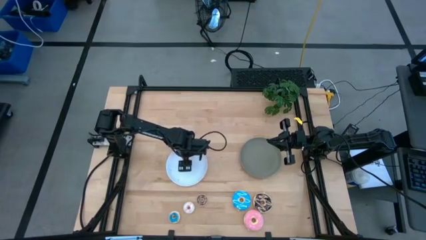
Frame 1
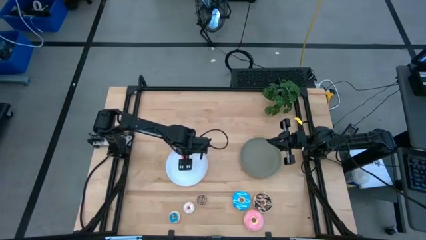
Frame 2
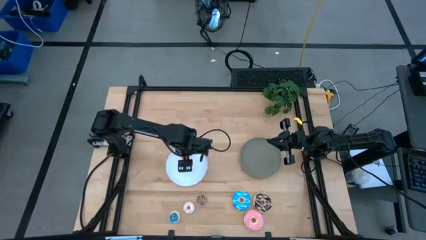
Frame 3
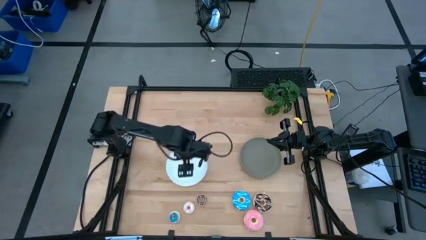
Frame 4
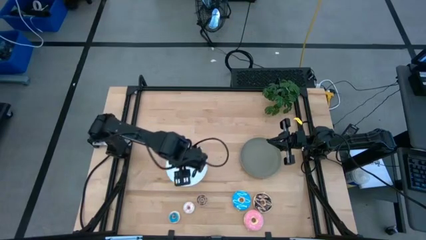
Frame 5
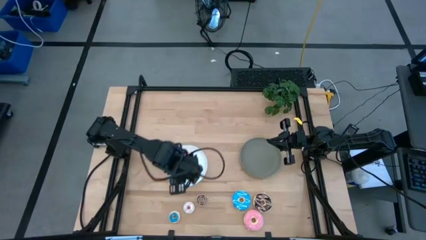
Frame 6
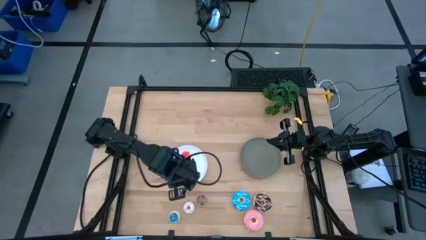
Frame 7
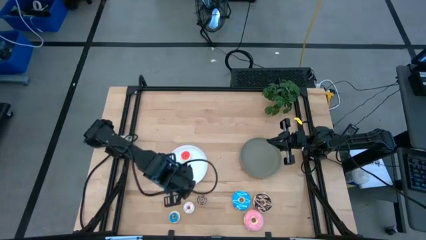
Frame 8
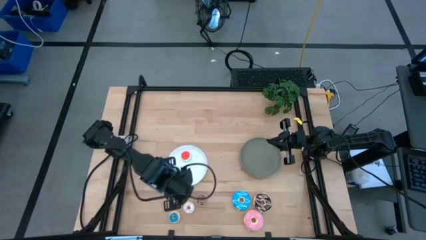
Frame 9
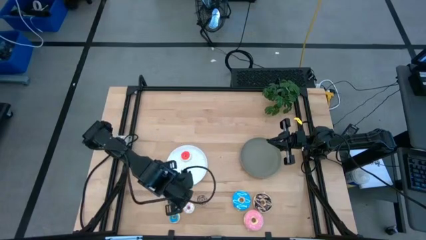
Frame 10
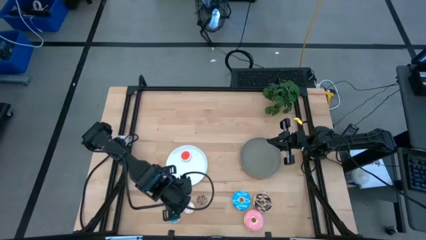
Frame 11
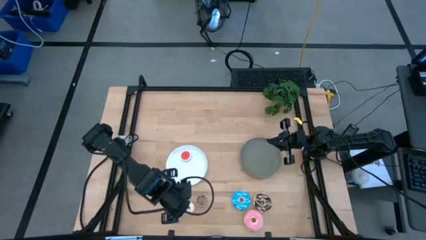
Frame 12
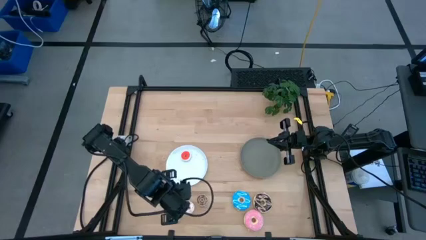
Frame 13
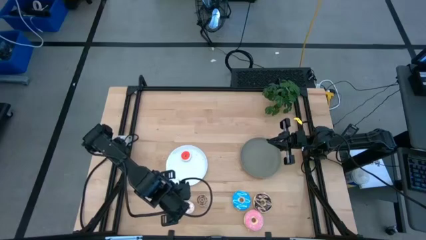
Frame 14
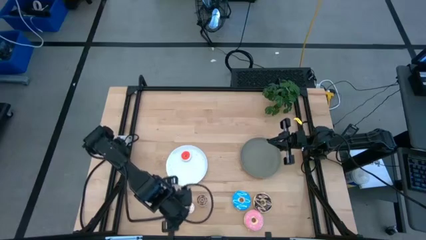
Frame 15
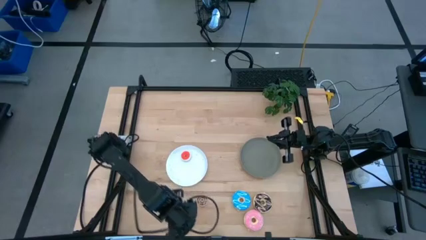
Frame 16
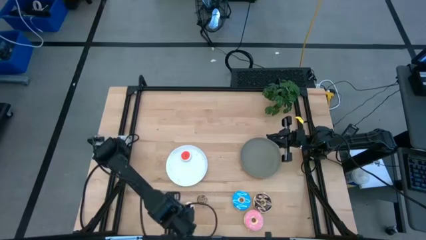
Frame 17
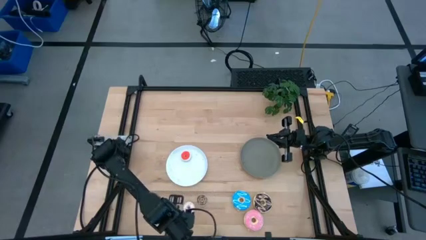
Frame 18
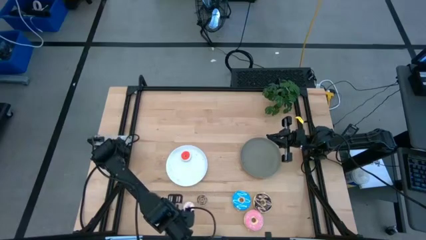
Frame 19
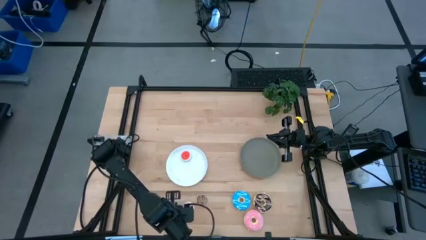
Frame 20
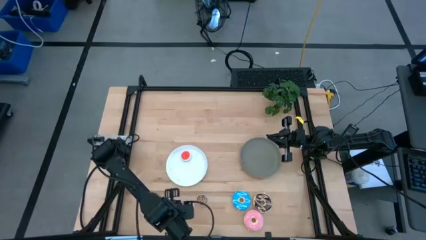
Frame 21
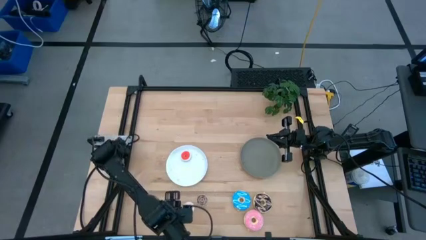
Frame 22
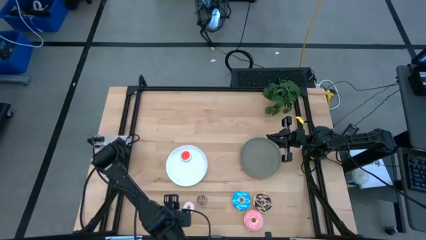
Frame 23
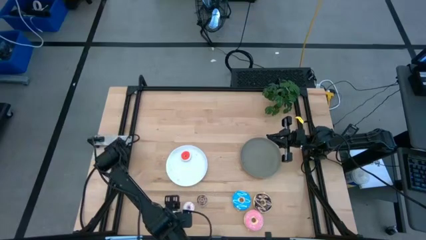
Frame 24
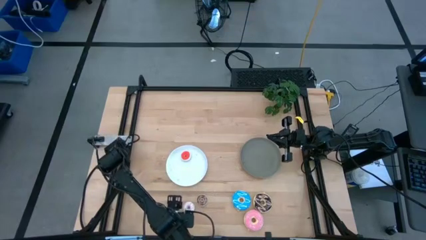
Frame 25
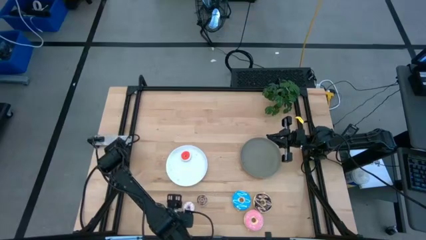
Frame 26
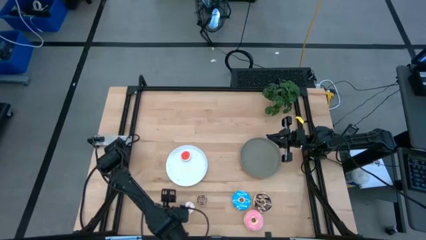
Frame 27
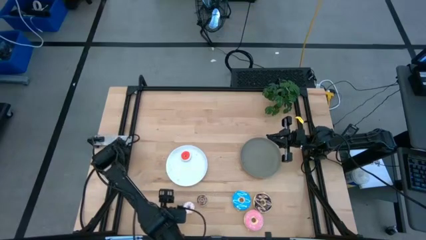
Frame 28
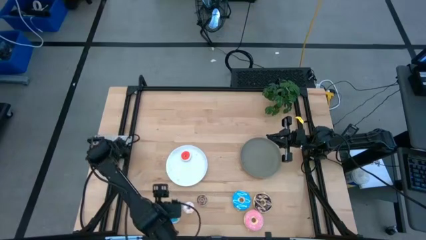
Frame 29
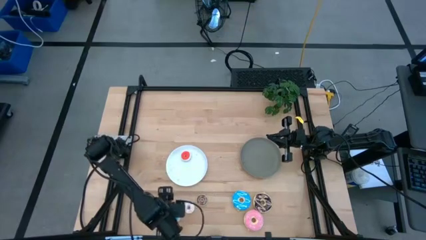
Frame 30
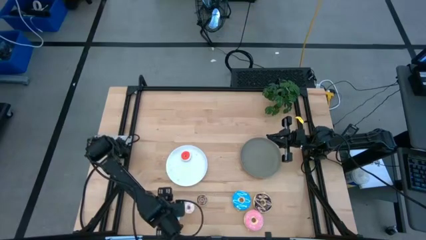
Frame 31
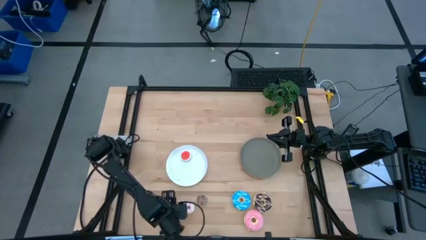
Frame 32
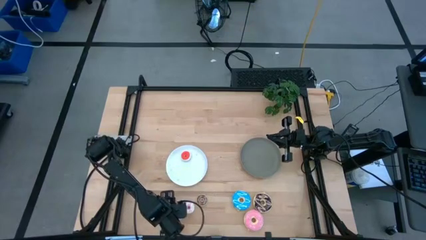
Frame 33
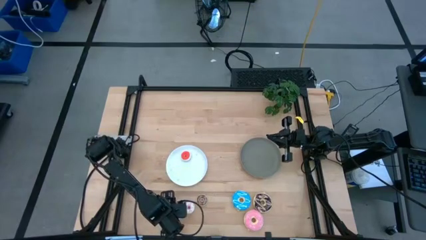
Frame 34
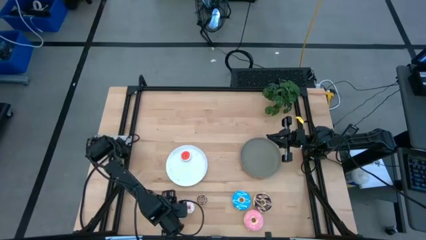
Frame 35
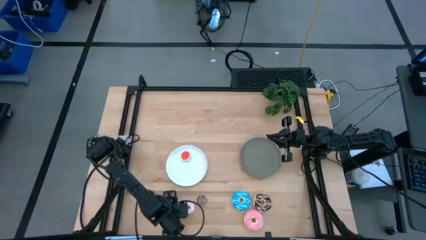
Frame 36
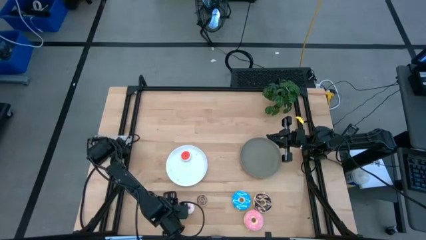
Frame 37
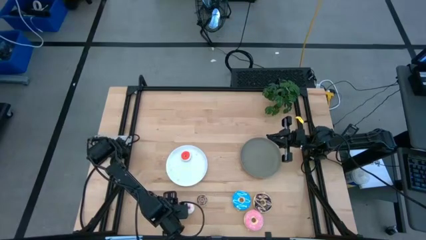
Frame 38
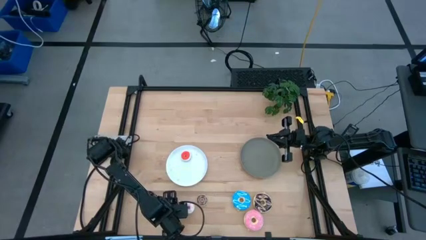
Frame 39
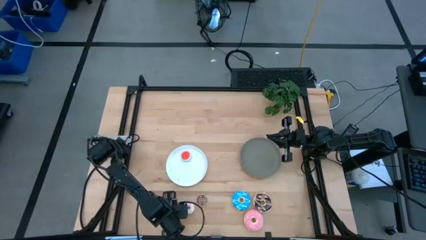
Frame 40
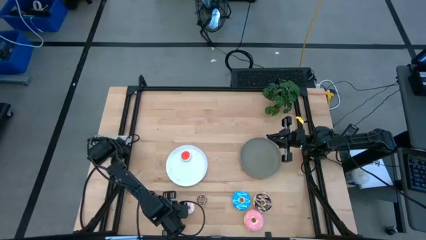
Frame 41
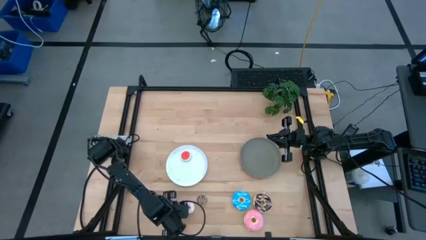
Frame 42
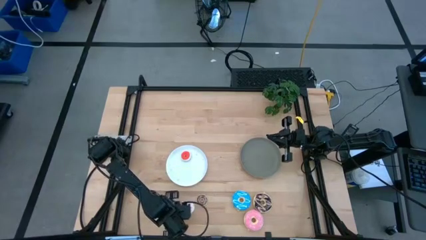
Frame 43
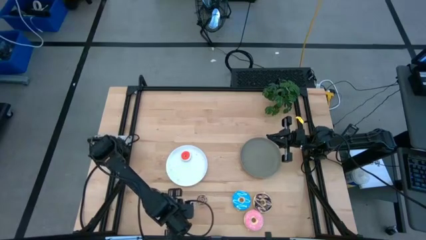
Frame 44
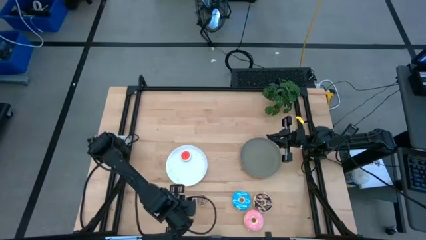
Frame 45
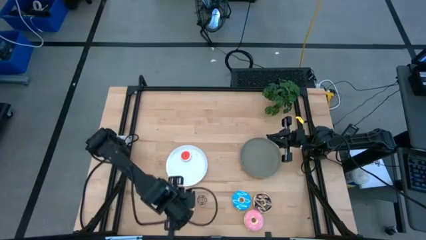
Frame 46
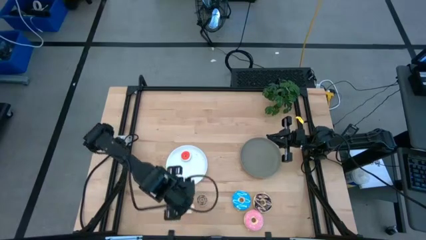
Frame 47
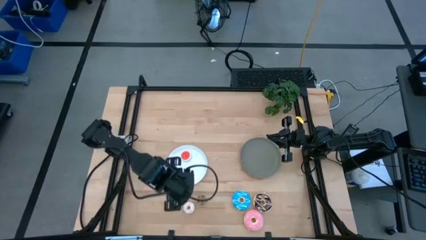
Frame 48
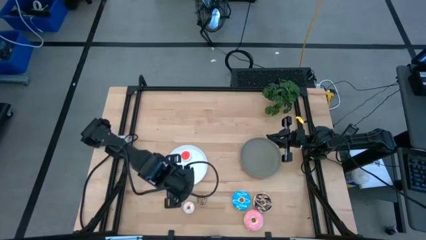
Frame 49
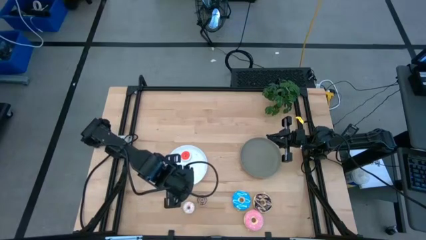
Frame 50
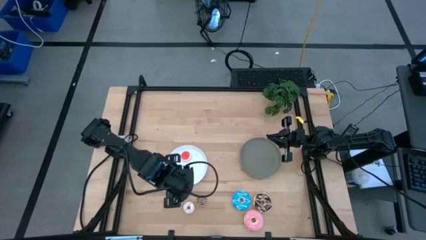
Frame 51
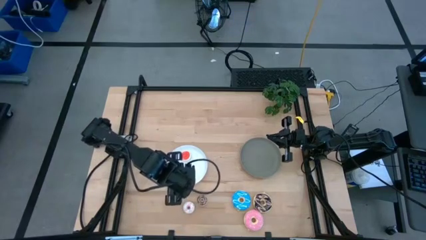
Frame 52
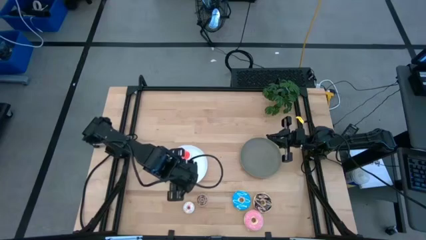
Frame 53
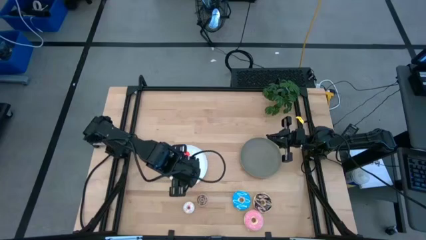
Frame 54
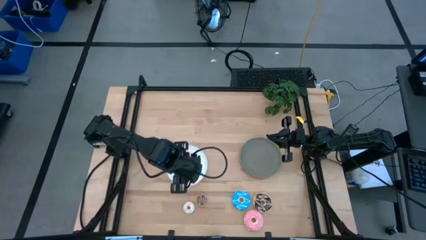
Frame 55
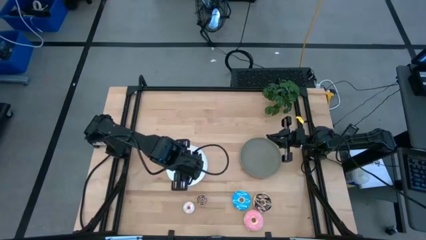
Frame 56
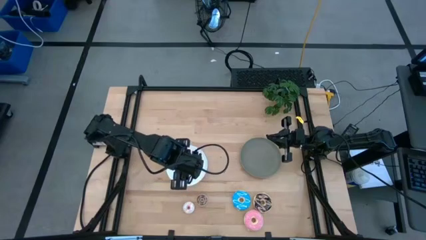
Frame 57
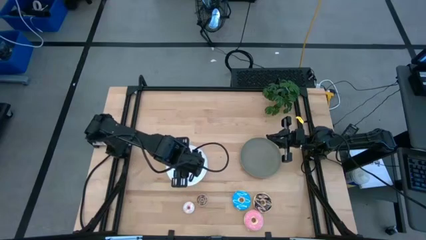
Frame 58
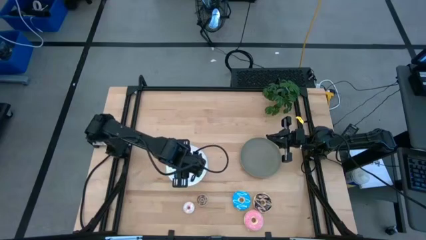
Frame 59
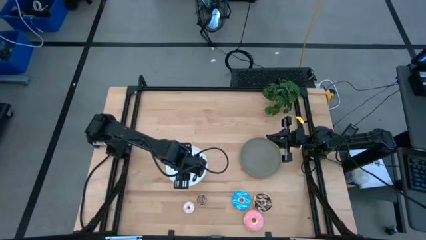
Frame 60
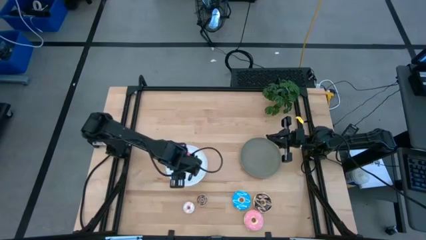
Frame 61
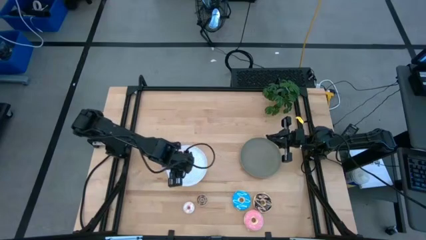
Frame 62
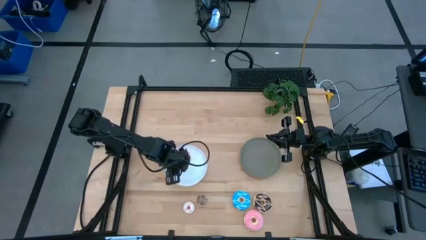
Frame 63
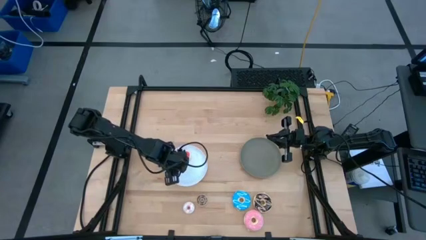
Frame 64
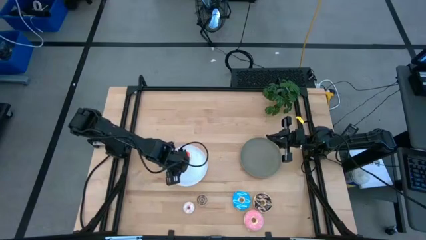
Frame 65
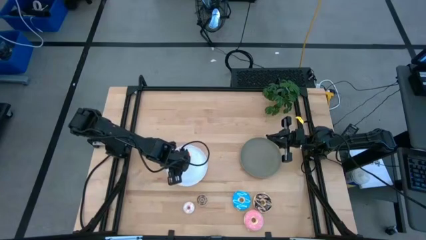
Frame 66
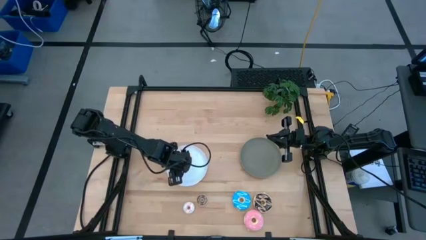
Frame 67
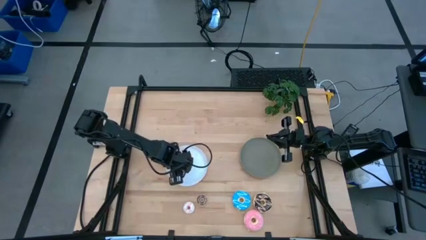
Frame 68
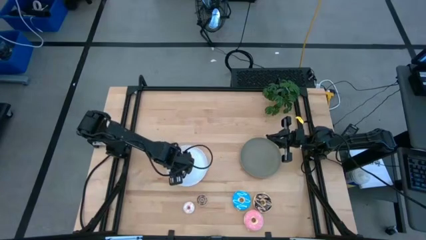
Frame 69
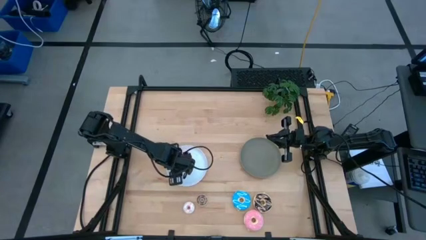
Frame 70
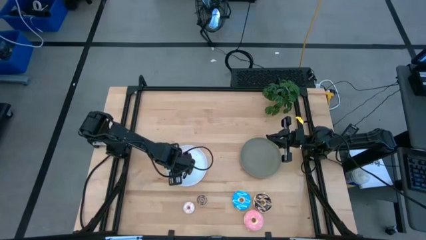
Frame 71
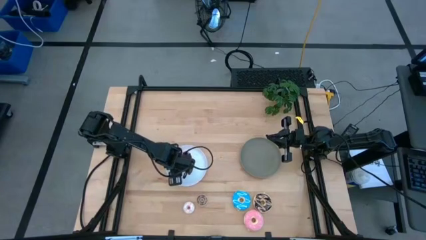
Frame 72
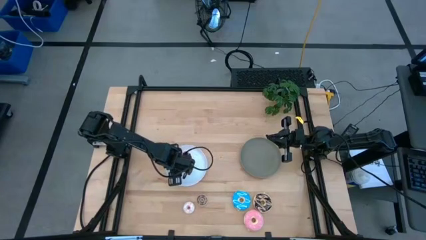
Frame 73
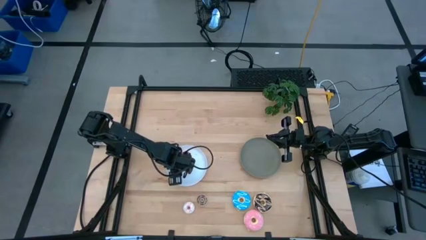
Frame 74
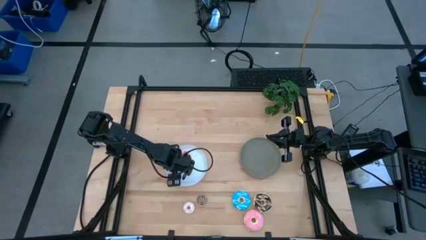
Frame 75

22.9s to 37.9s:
Task: Pick & Place donuts
Put the small blue donut on the white plate

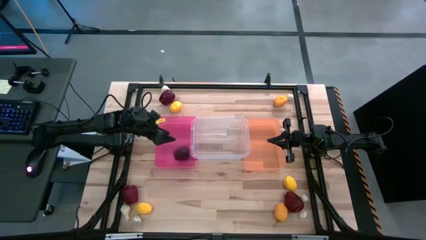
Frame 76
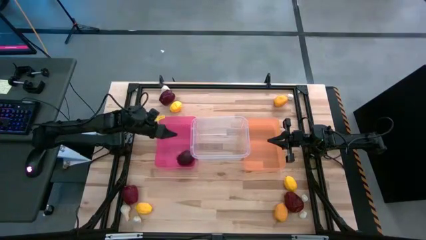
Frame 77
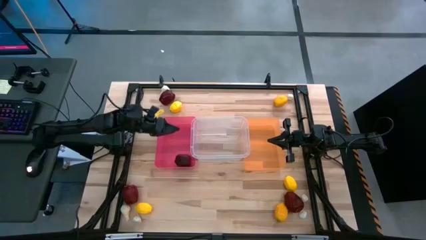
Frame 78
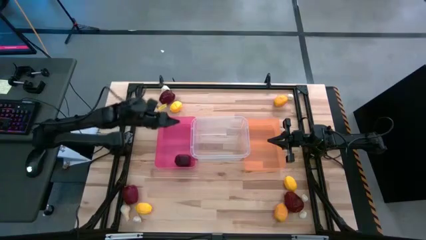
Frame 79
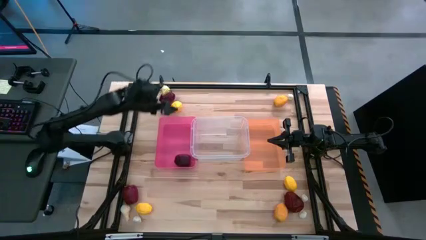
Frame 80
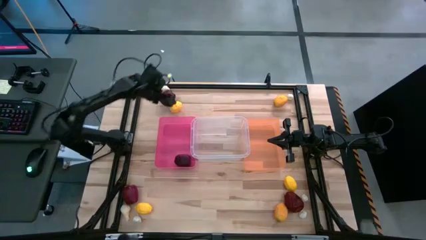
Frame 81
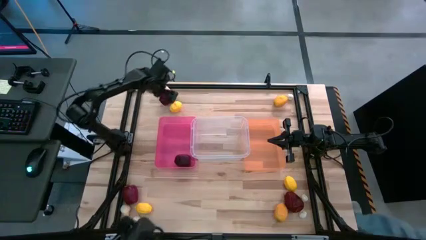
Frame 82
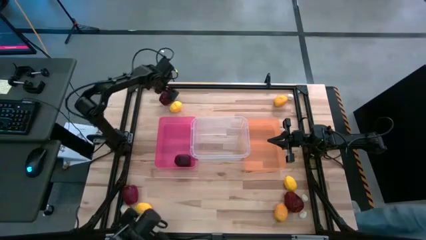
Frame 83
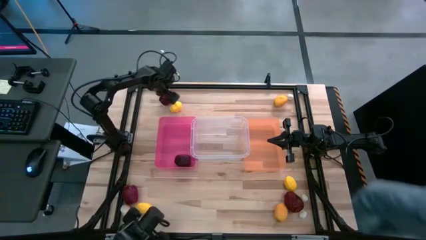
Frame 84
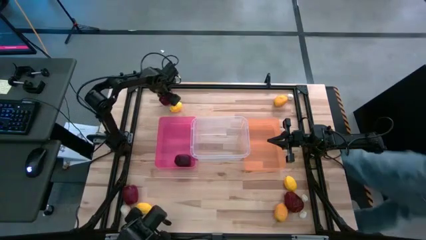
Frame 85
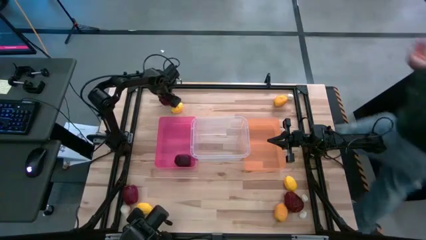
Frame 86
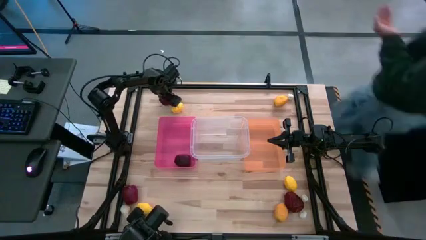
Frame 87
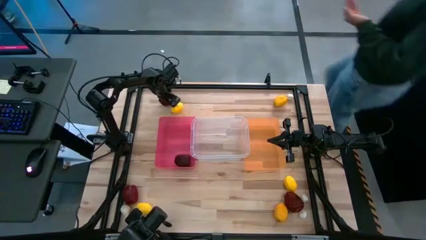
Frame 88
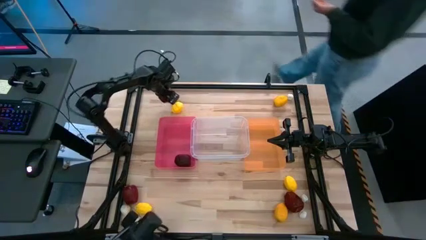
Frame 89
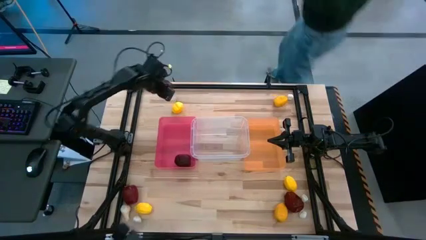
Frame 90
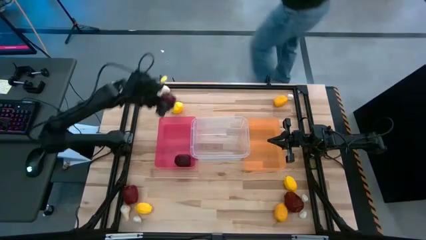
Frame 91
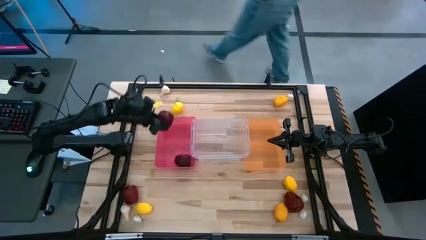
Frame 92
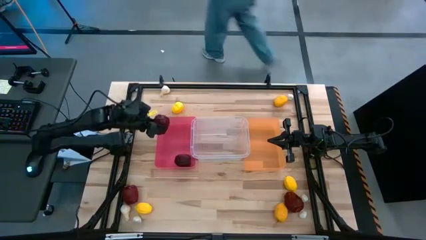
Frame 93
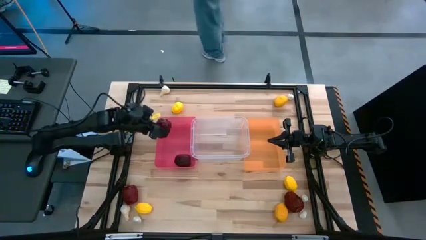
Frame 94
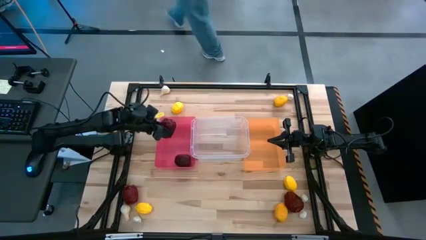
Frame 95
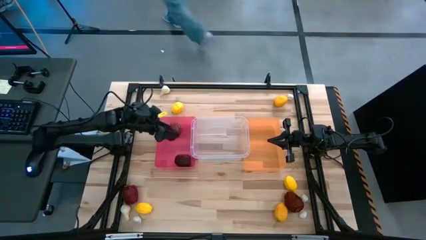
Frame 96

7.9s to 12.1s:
Task: Sort produce into baskets
Put the red apple into the pink bin
